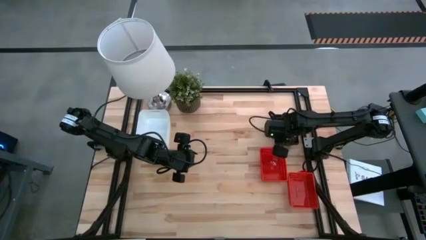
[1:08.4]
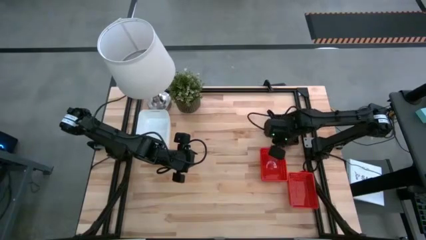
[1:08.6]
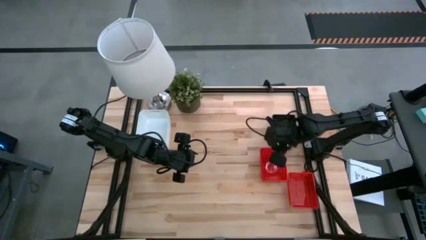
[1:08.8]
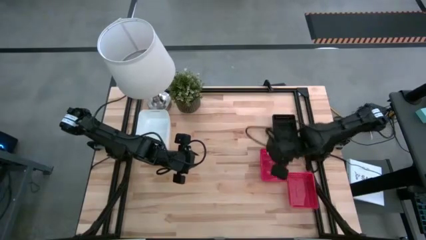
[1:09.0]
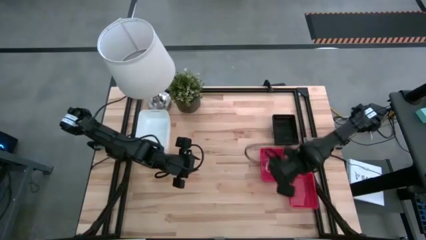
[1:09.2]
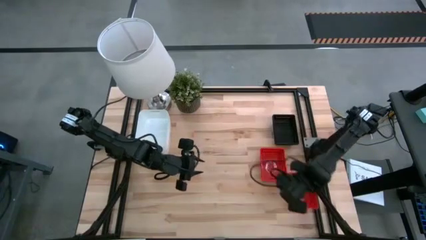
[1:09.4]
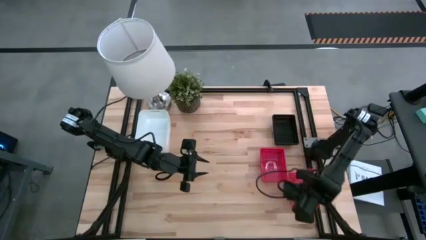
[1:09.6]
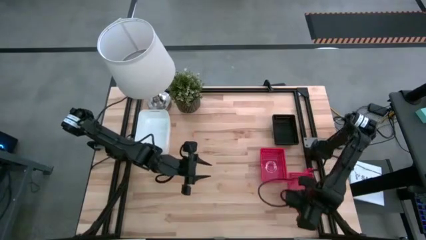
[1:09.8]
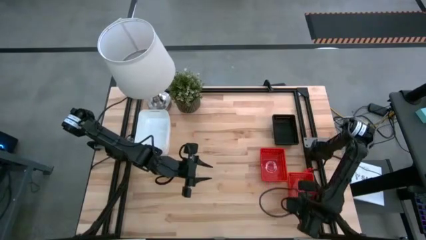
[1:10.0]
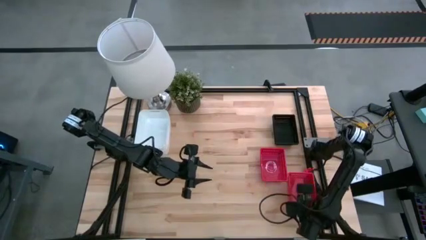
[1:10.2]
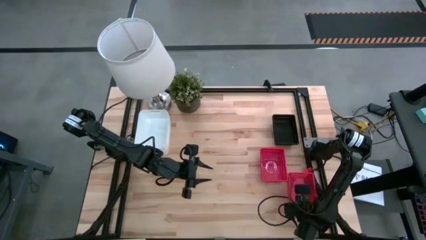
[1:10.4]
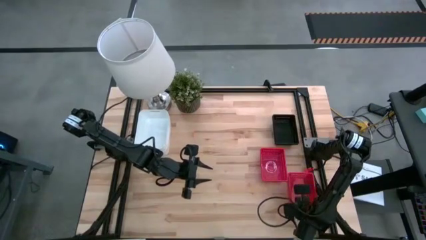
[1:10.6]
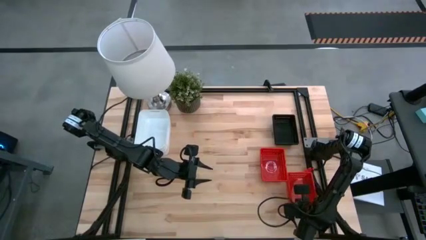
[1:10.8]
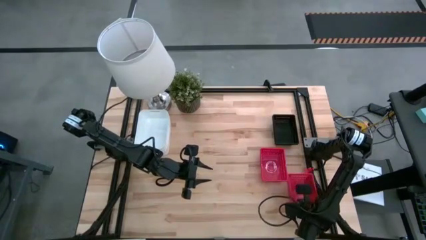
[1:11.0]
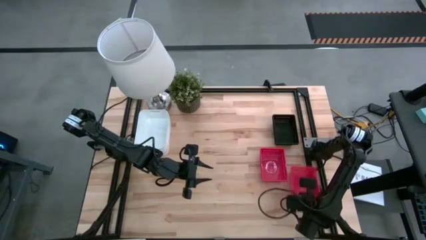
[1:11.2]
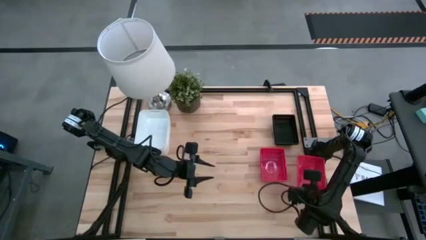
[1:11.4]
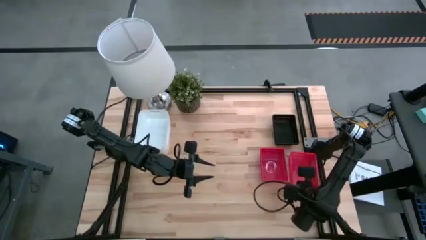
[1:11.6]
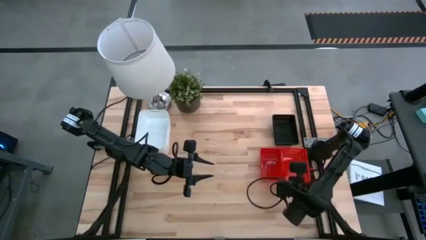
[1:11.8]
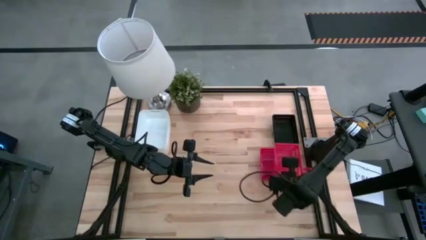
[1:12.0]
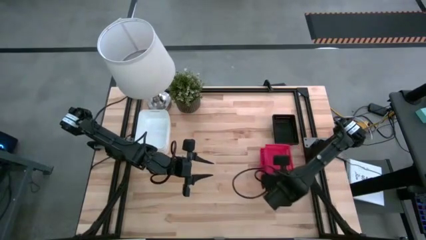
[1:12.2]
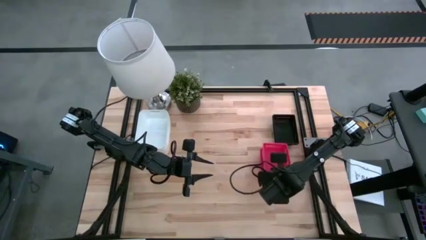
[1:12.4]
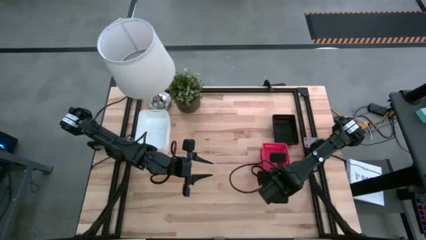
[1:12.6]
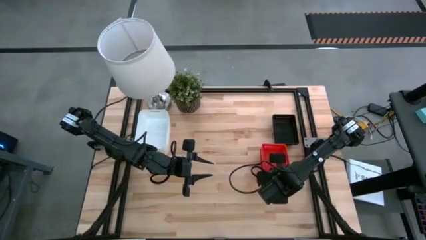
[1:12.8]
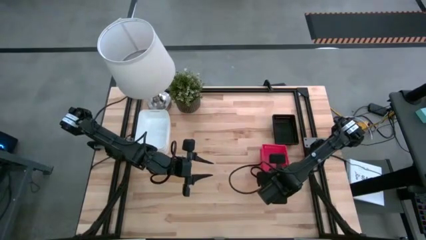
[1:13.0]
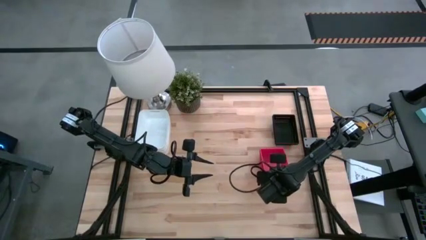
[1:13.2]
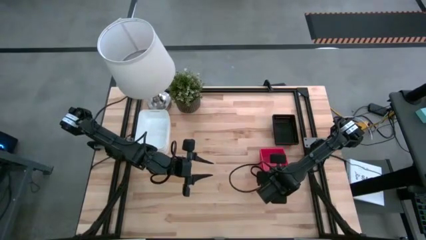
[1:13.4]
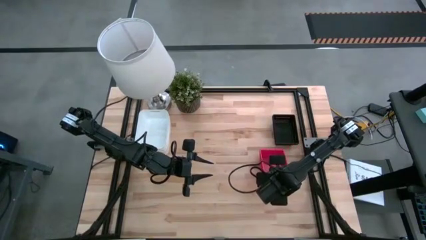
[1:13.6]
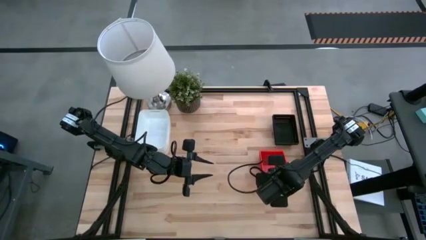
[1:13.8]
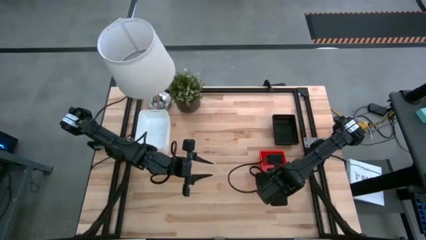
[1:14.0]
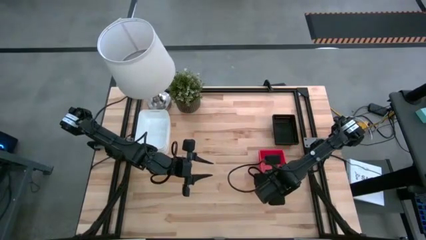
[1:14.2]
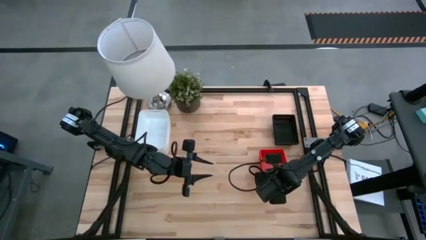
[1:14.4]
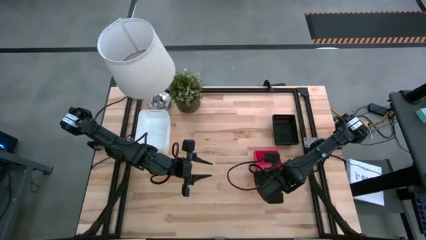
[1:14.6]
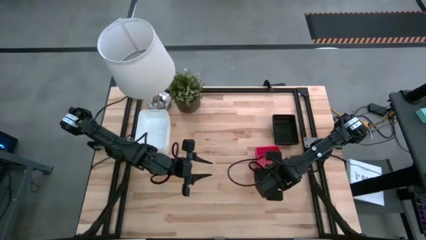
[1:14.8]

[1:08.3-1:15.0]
Stack the right red bin on top of the red bin

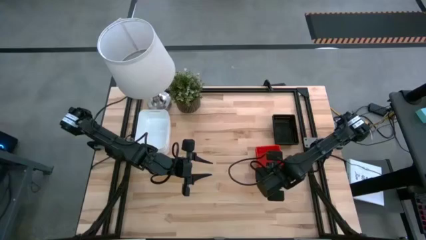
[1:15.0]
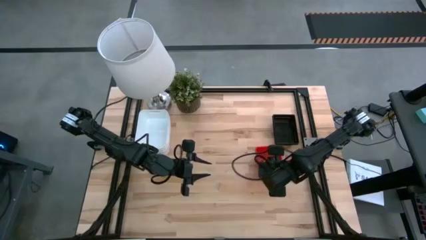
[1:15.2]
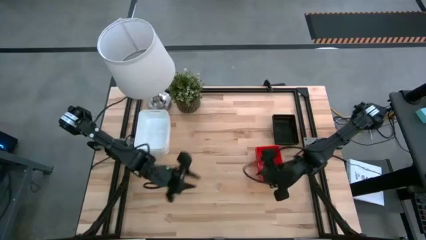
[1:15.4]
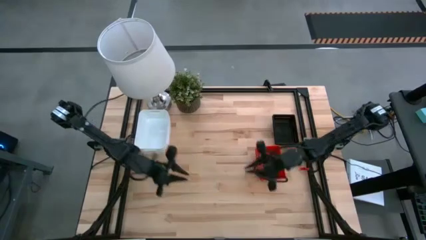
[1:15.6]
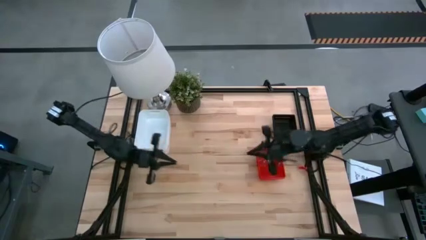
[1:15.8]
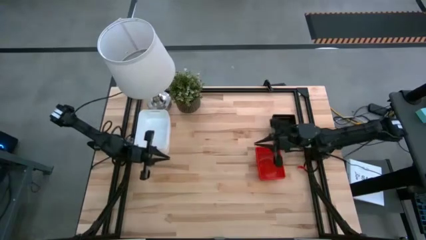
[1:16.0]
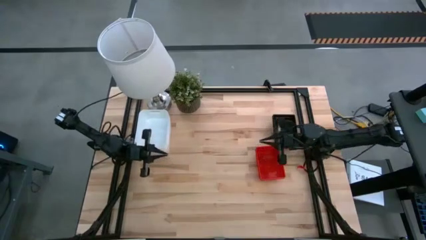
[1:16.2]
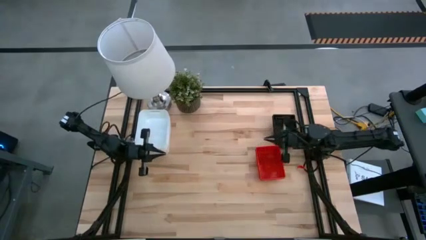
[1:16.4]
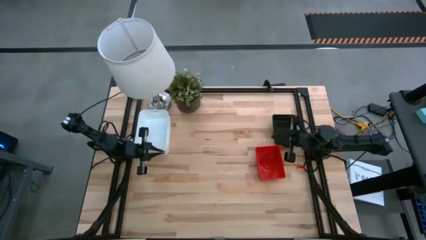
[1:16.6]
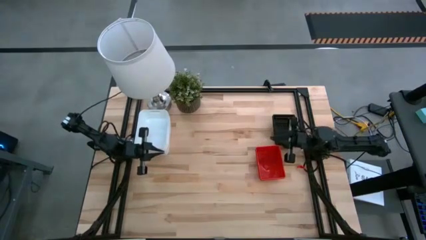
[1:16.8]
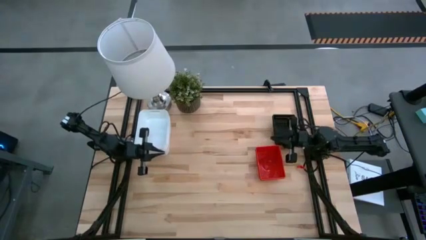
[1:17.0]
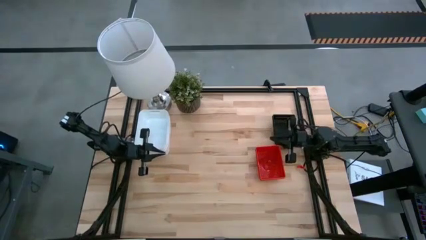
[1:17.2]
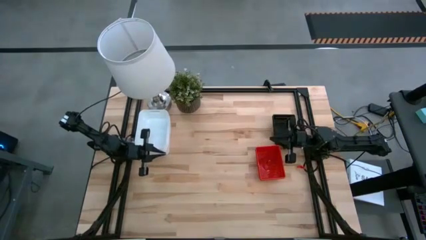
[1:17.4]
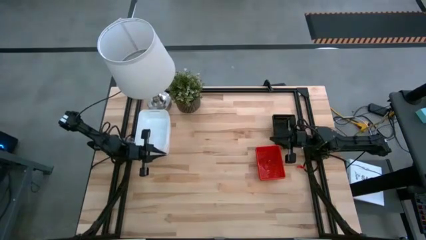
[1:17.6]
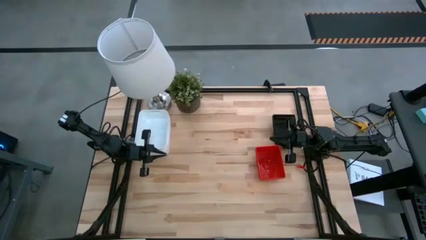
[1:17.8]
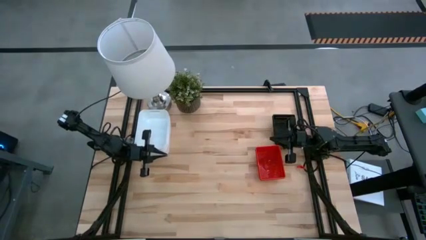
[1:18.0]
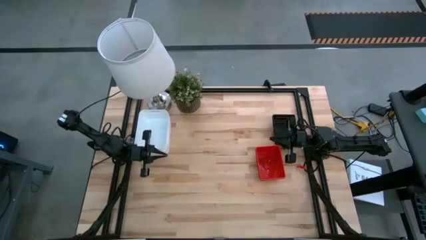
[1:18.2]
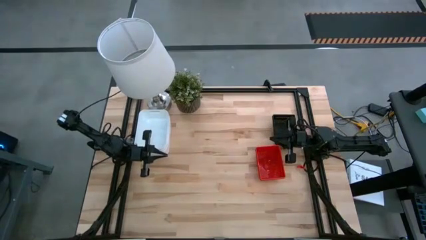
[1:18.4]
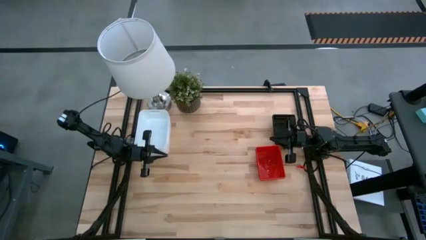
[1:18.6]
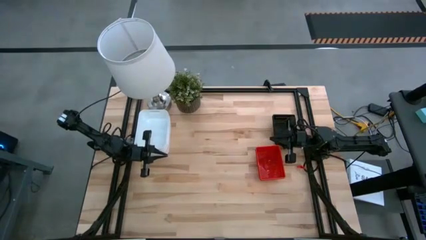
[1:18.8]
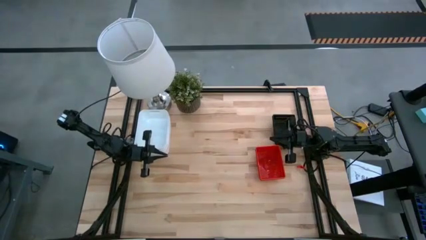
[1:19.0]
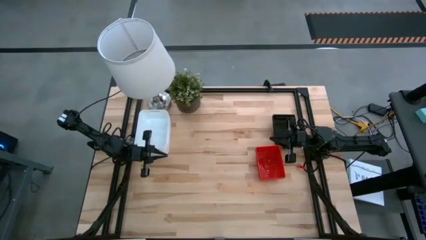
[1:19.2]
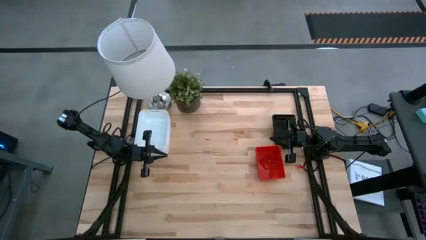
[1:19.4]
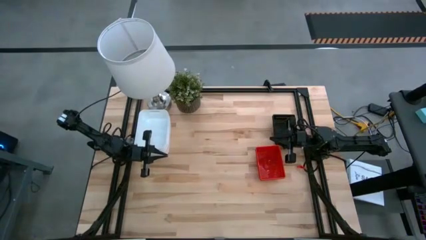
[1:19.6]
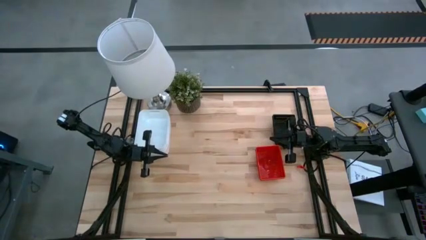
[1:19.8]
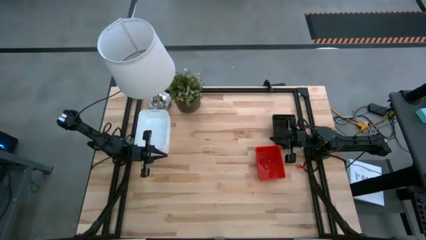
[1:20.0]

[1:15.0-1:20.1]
Return to Home Position
